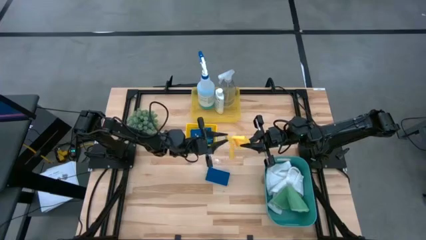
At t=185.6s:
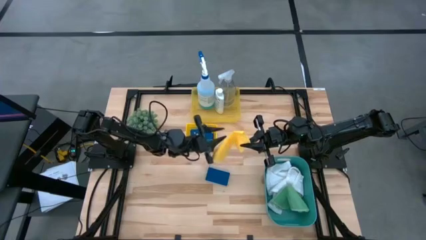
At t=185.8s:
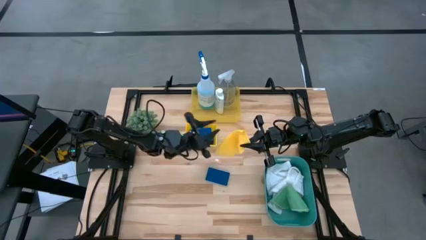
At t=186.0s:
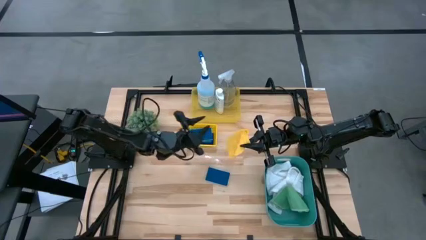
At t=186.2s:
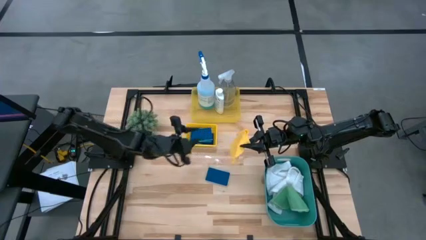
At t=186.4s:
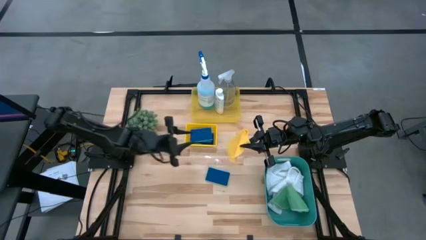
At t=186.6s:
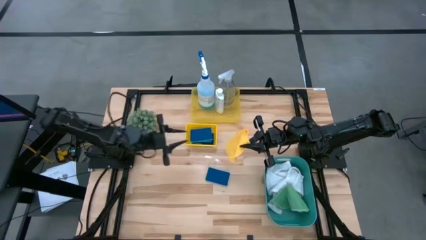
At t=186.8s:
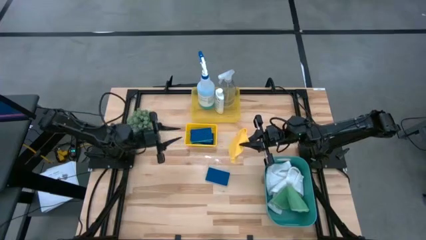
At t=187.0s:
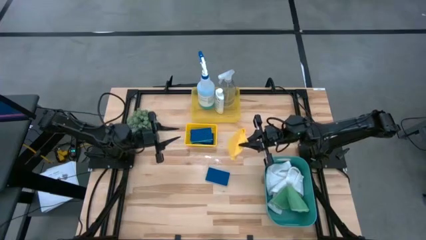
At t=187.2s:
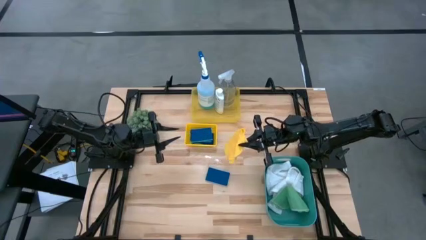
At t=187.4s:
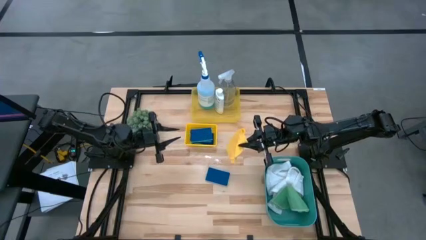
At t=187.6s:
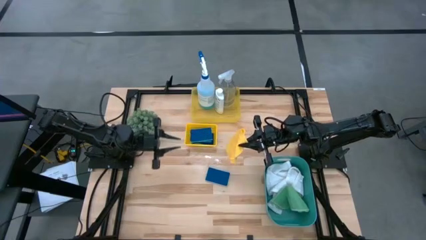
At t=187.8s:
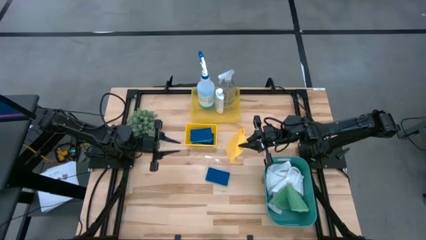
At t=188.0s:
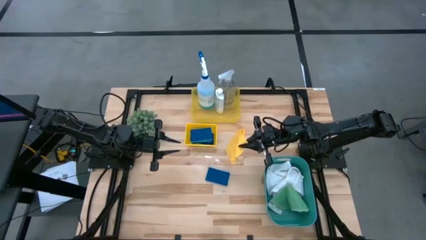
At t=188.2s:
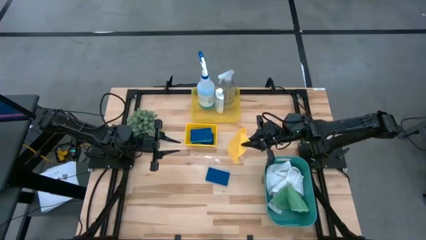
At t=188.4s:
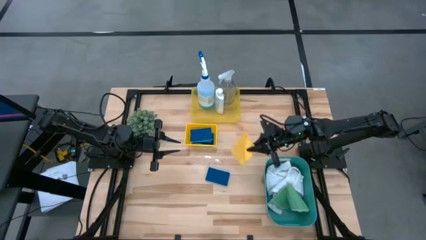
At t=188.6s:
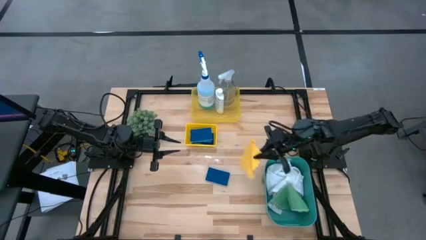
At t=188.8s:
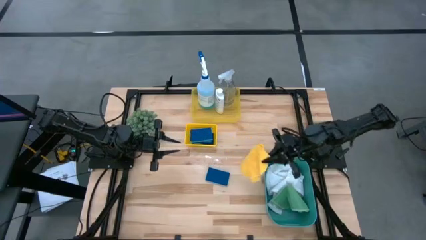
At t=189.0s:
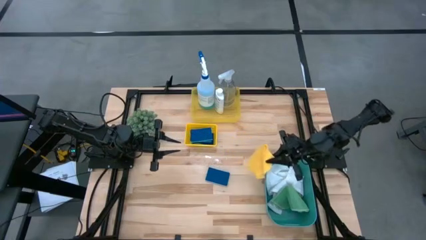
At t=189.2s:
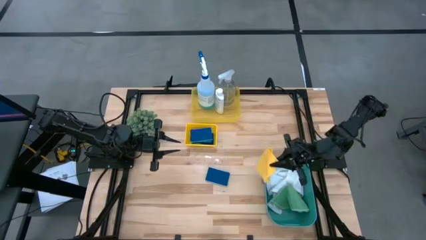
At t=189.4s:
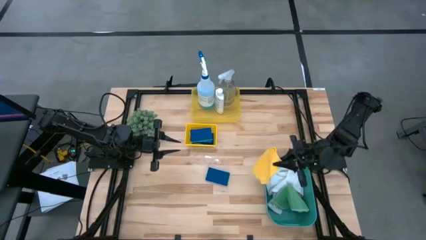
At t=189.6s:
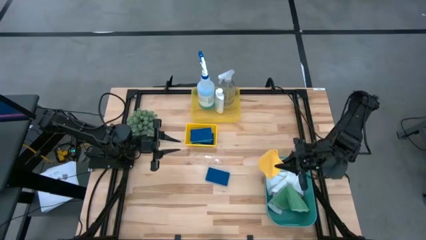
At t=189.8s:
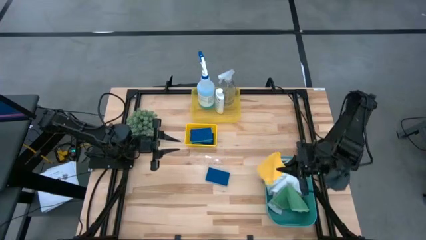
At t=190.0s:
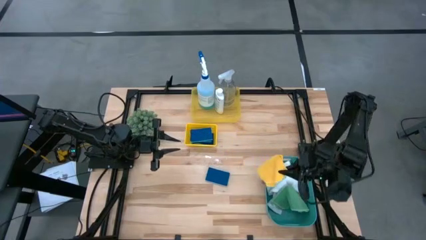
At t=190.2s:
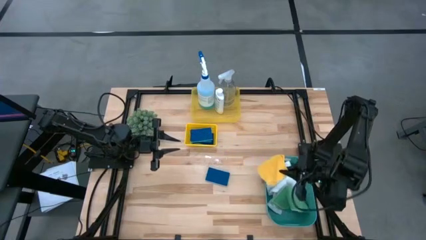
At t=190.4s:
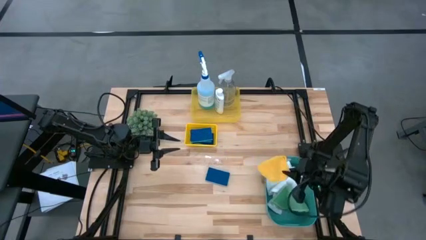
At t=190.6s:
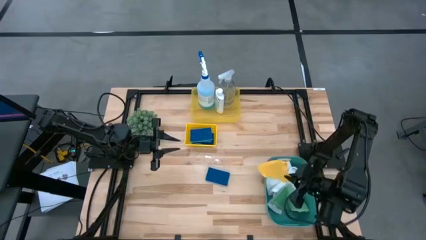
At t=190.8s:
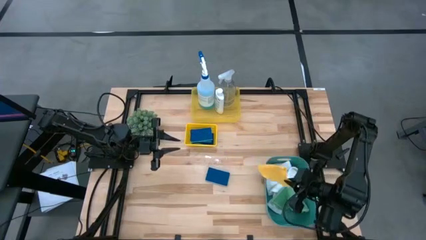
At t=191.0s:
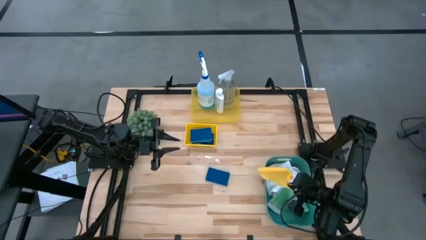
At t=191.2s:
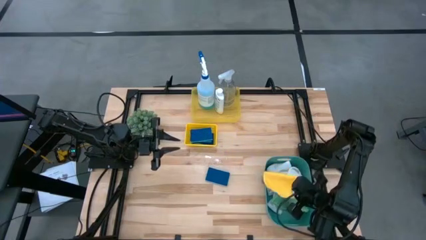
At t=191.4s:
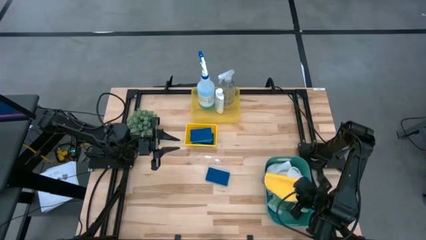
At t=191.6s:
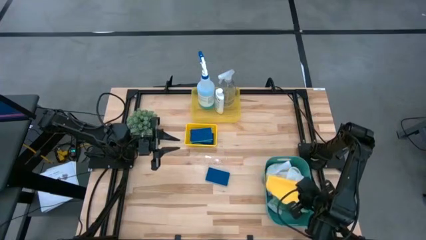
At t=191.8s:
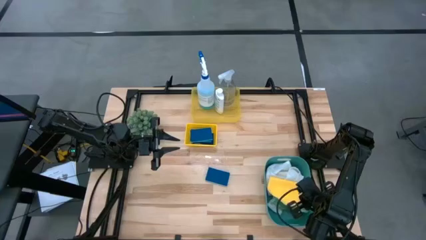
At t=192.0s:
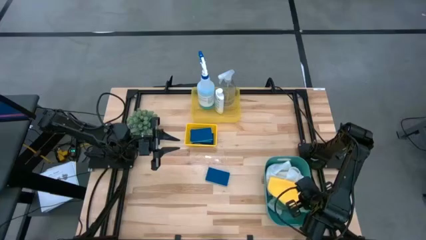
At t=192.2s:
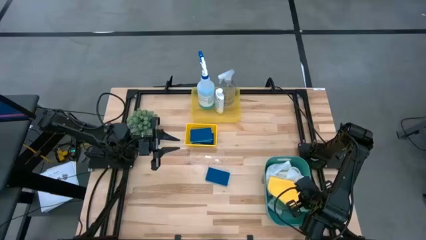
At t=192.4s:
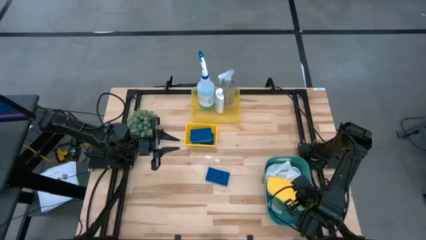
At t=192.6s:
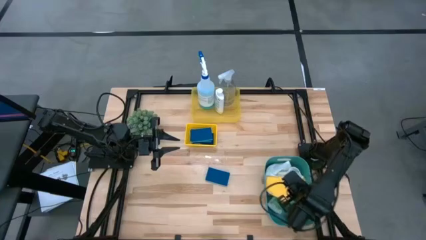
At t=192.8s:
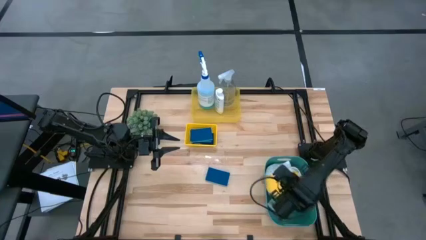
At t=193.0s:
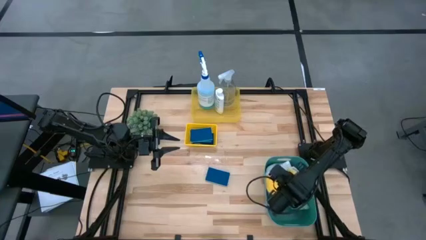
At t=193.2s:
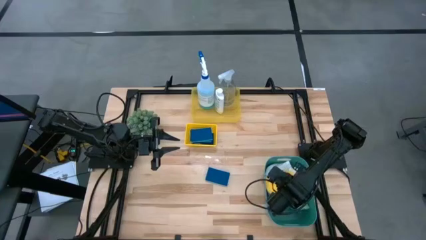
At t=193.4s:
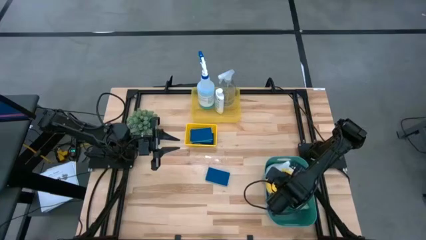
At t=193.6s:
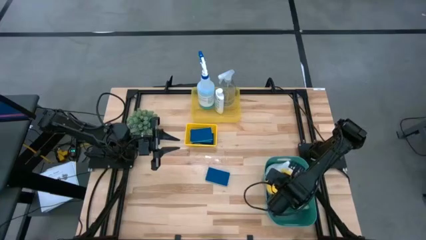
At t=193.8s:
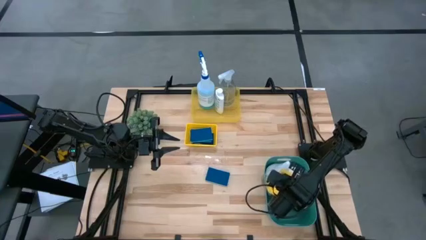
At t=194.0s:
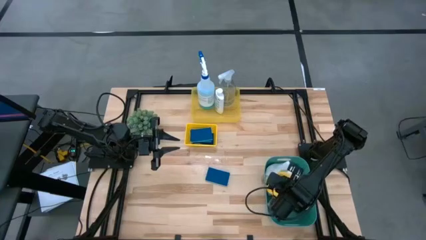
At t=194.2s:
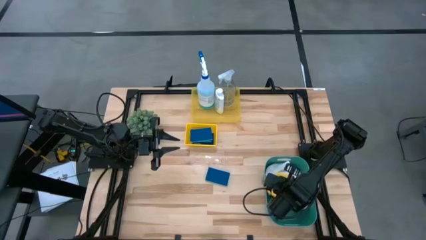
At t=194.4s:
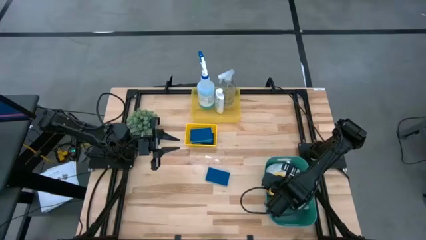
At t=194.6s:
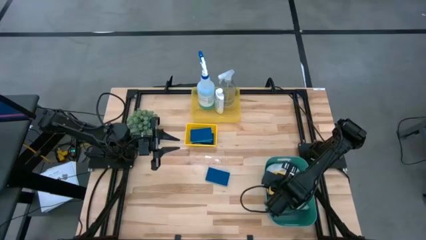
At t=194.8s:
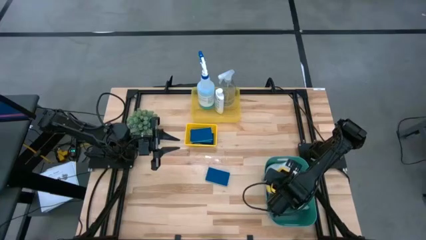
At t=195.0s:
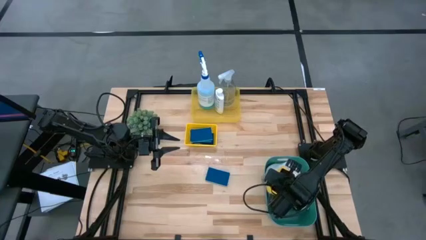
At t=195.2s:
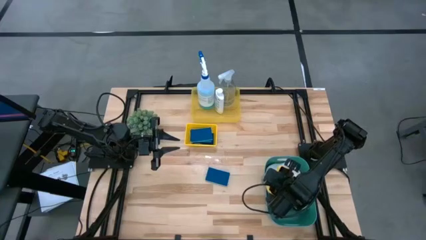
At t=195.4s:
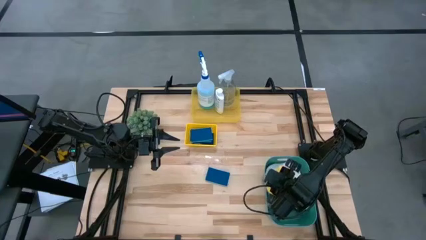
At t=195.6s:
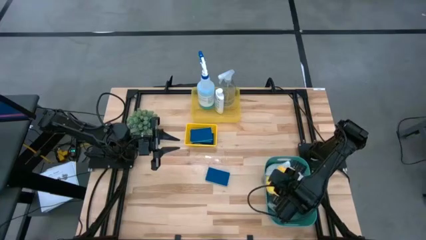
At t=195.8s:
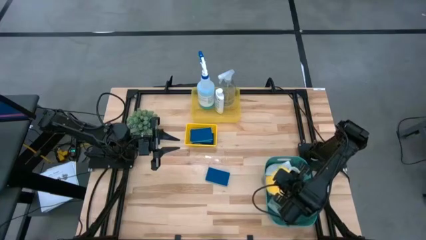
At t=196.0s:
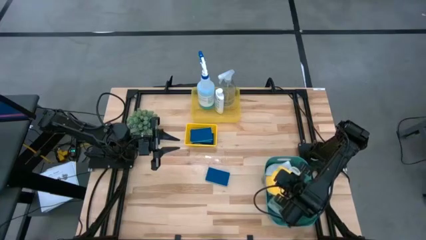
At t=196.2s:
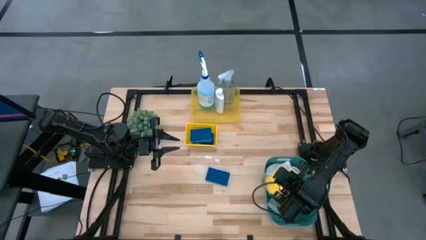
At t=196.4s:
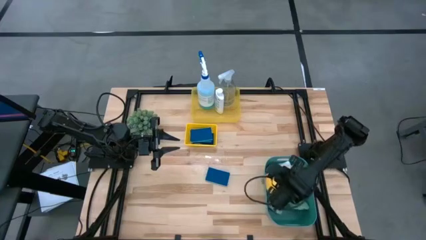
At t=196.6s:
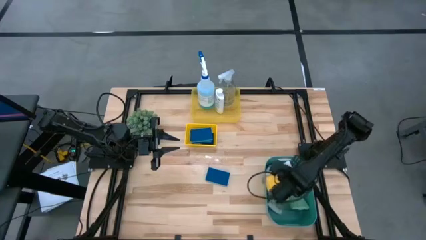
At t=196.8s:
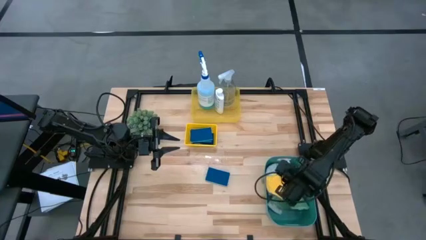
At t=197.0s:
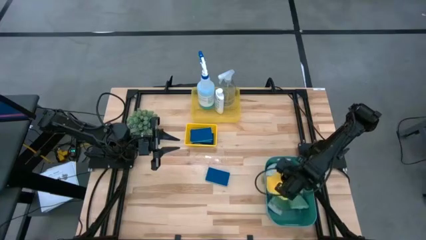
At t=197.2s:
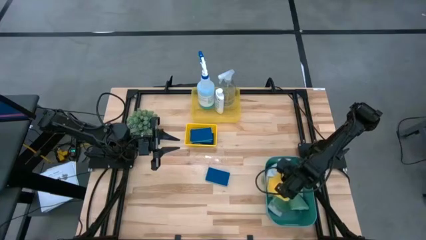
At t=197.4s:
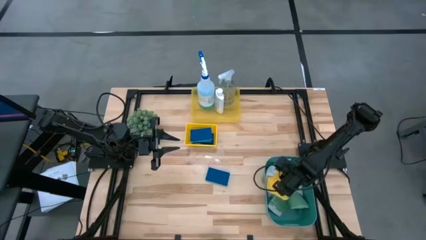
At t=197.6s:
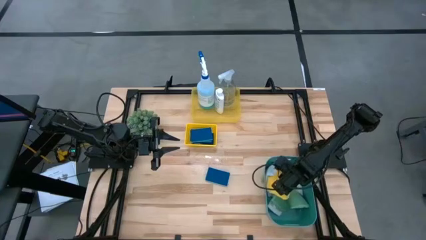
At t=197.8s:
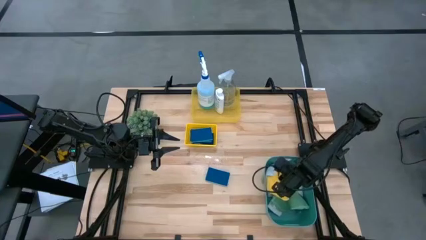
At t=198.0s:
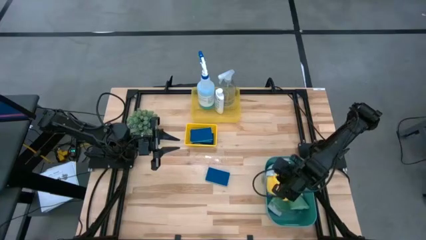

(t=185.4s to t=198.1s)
Task: Pick & Place Kitchen Items
Put the yellow cloth into the green bin
